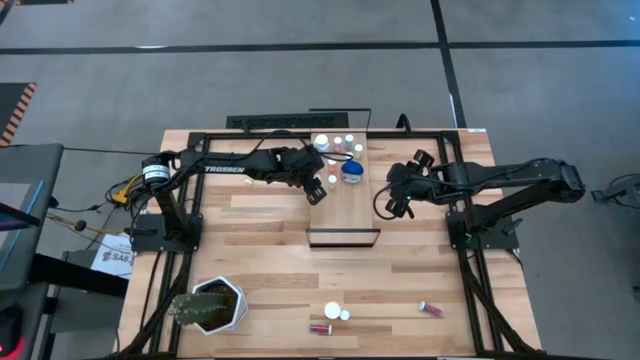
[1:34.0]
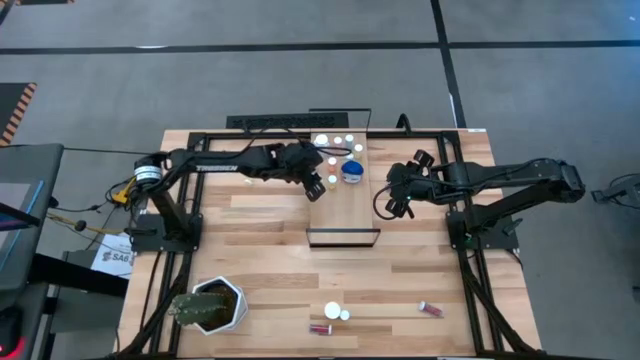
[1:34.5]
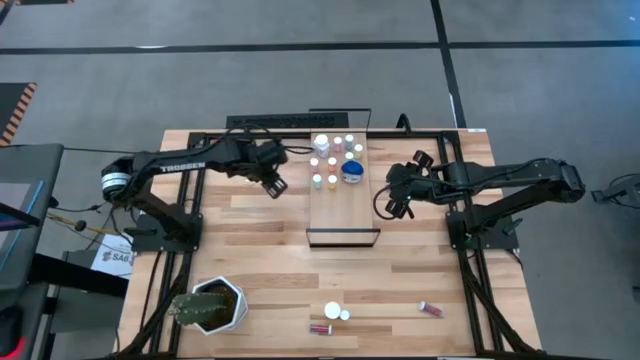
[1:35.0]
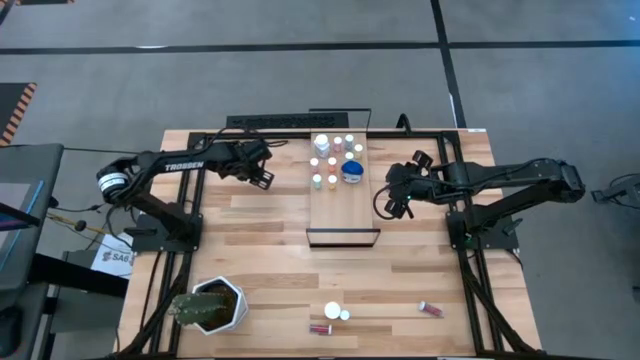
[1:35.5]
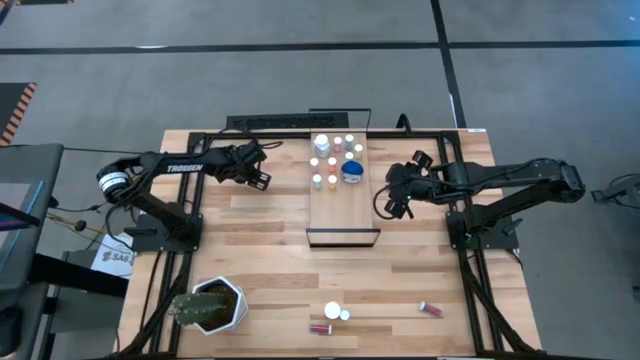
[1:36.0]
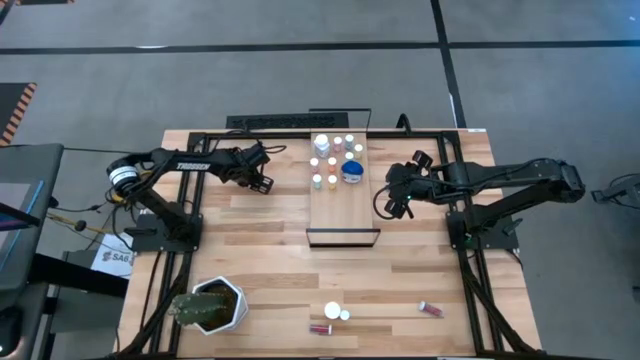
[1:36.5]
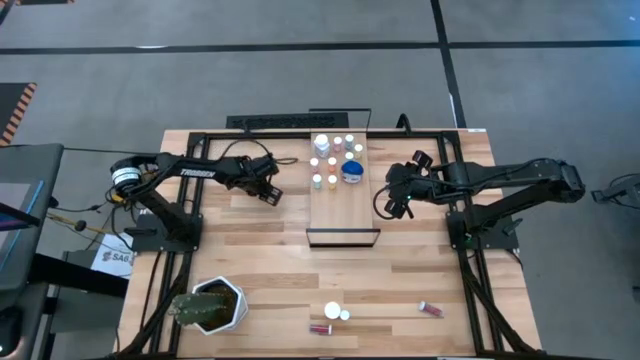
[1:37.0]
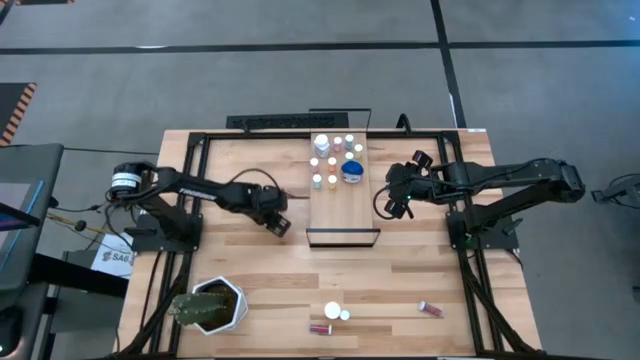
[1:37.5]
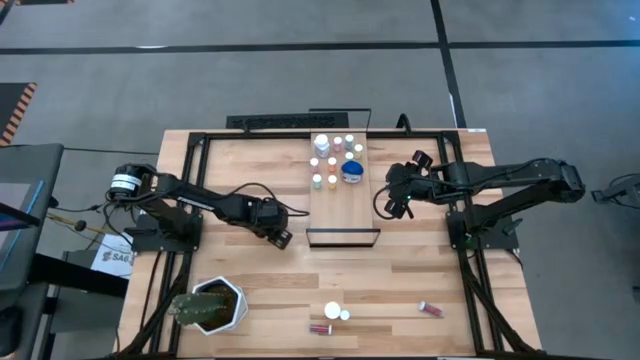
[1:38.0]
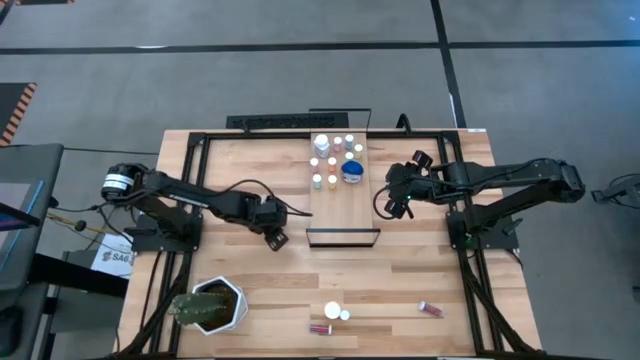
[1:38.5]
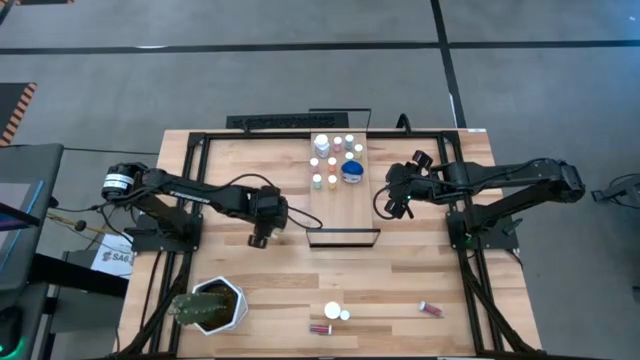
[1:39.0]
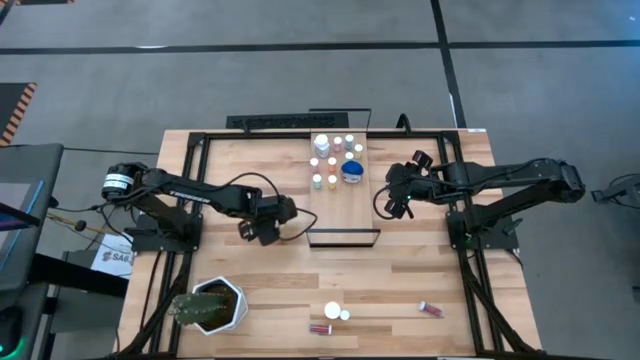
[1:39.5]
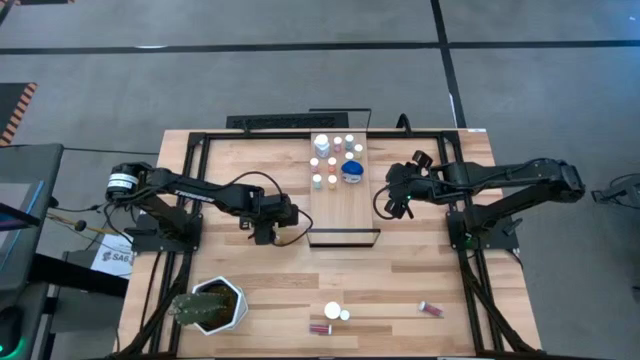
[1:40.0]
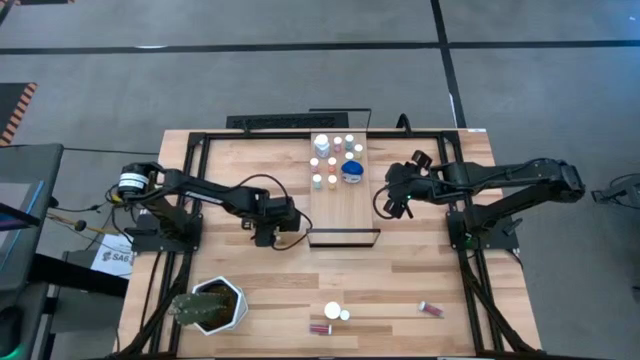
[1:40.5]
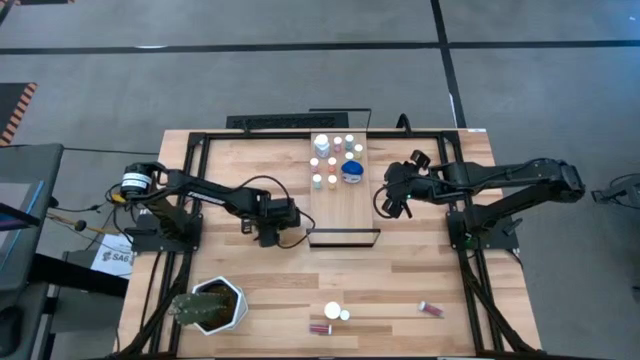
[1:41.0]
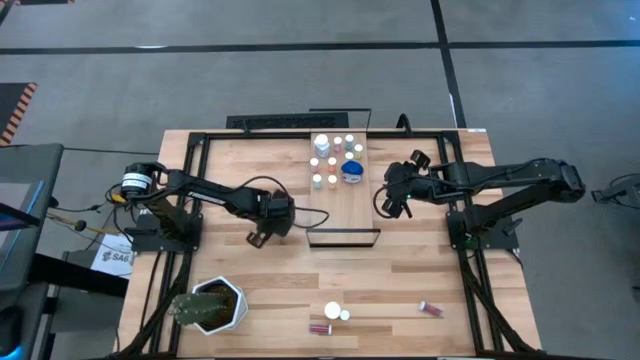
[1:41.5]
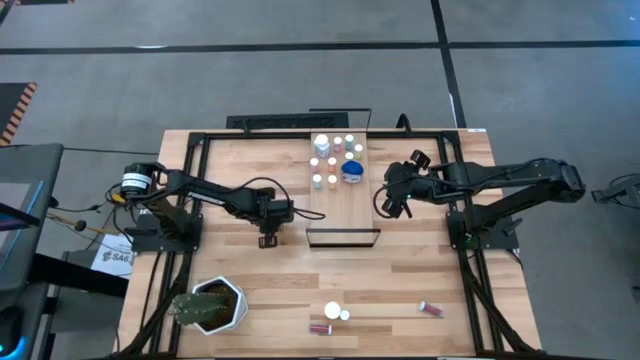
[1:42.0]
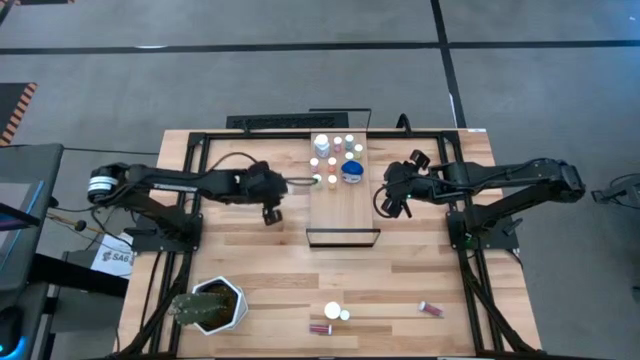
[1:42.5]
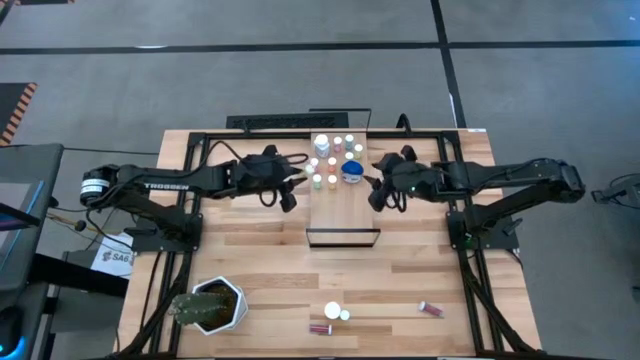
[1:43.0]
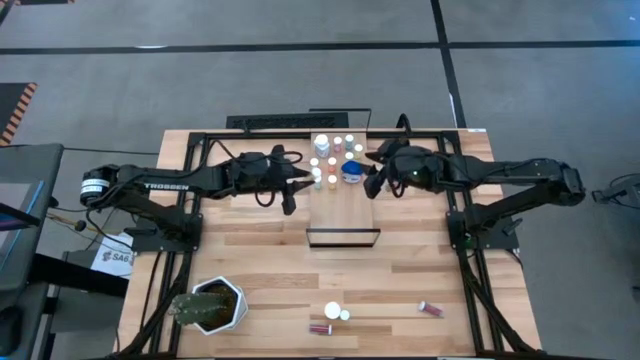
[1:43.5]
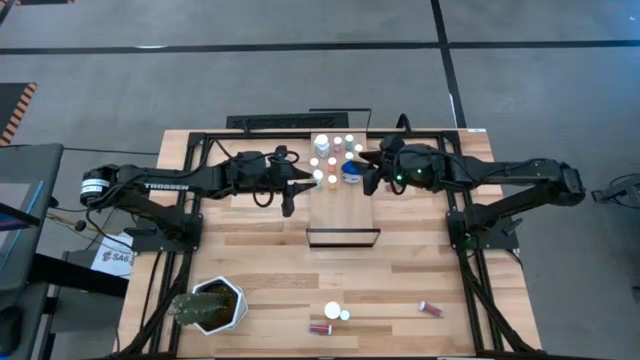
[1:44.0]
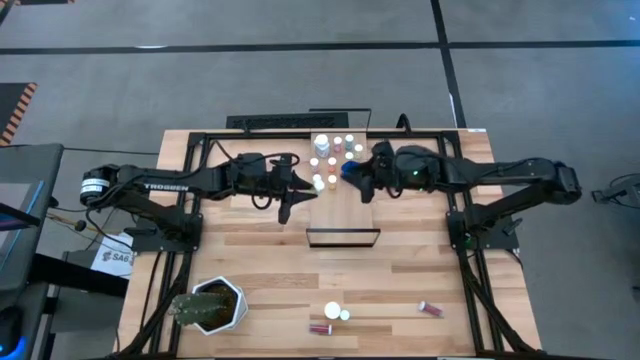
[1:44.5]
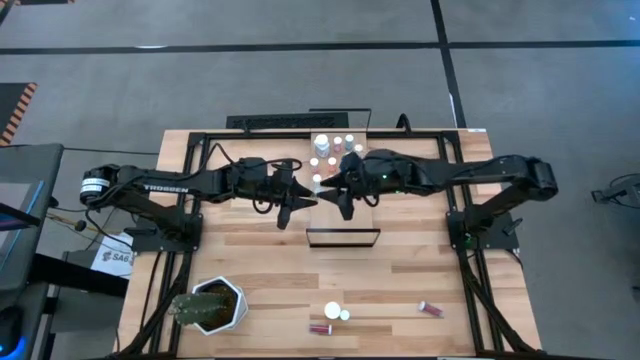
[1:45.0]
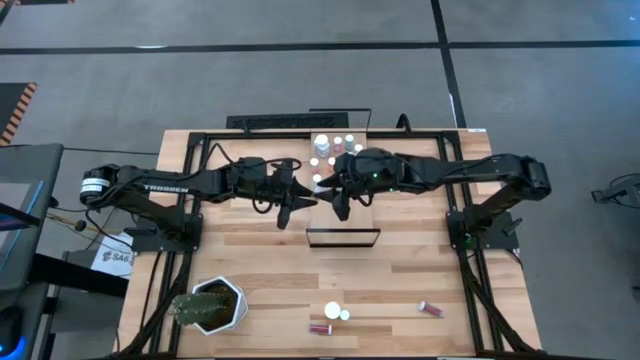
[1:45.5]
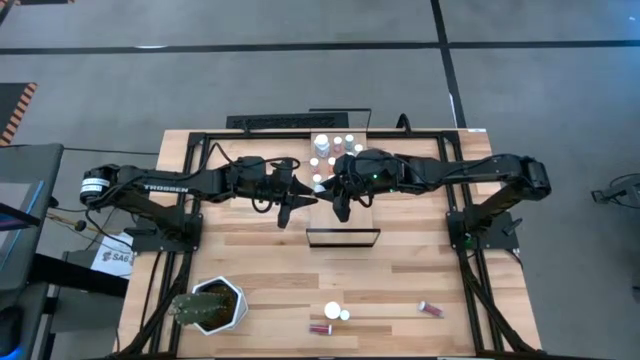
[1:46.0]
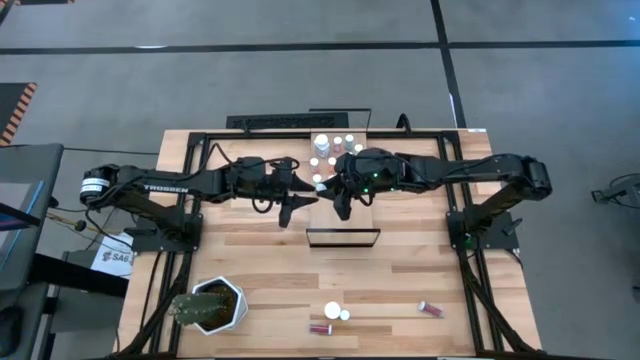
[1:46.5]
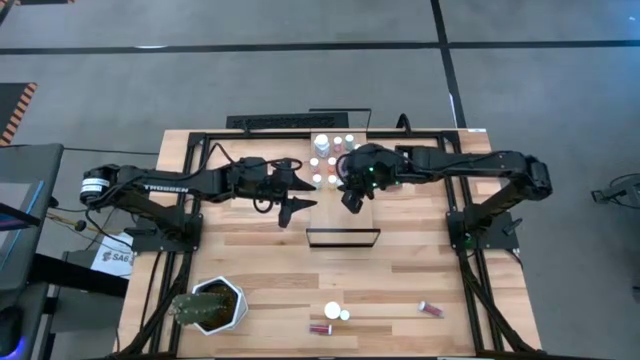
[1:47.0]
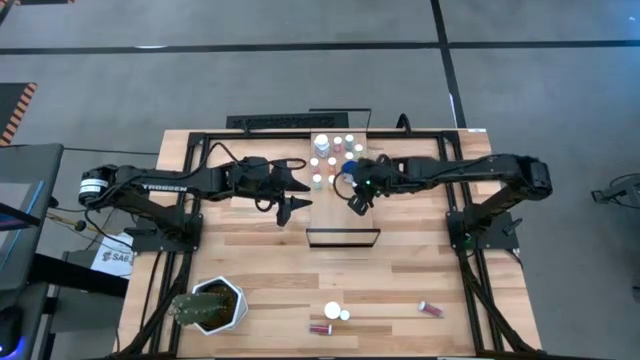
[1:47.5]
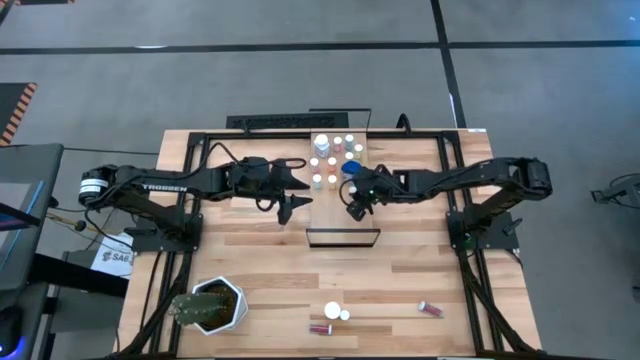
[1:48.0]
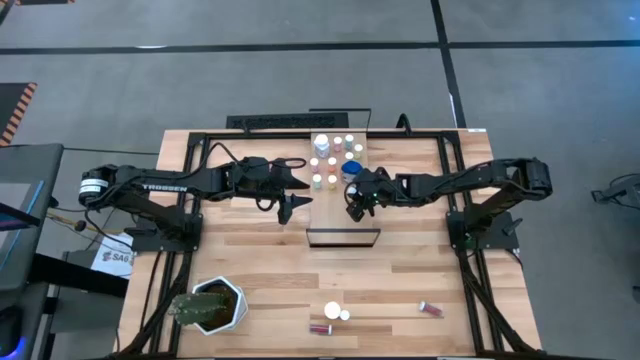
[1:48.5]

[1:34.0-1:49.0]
Task: Pick and place medicine bottles onto shelf by color
Put the yellow pill bottle on the shelf

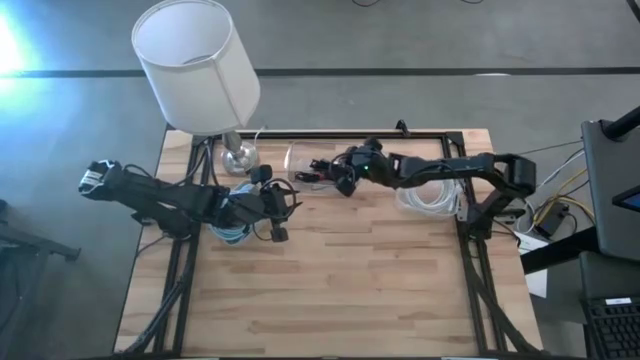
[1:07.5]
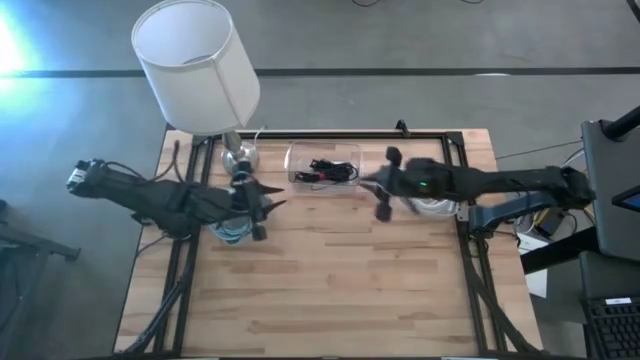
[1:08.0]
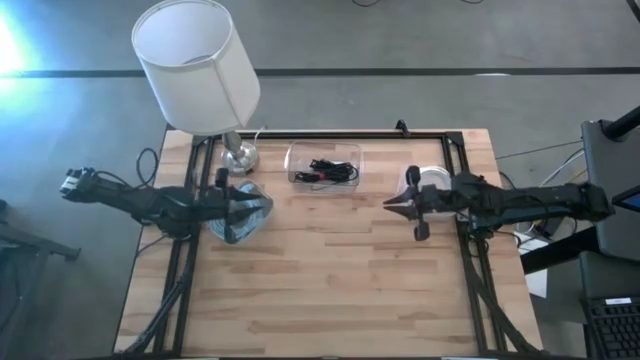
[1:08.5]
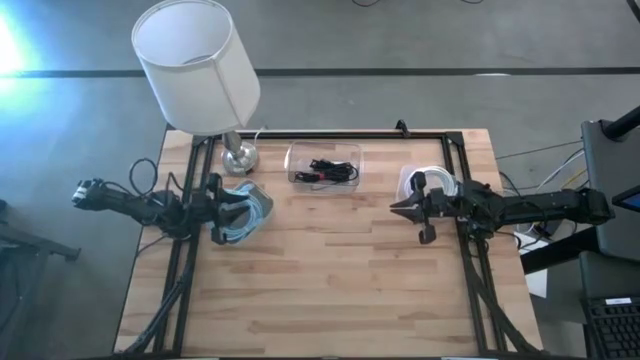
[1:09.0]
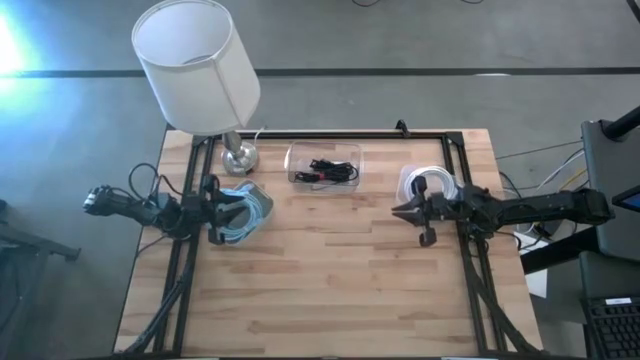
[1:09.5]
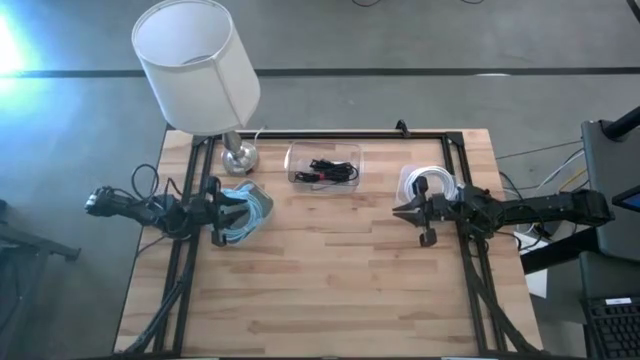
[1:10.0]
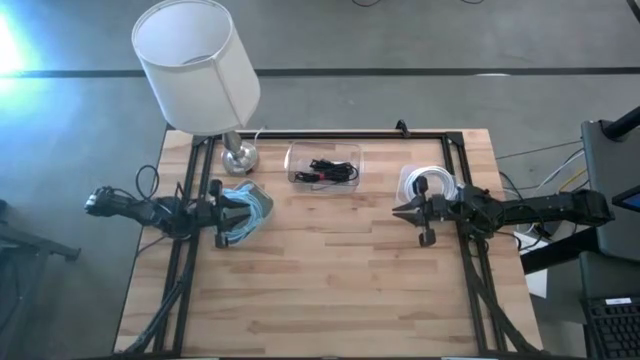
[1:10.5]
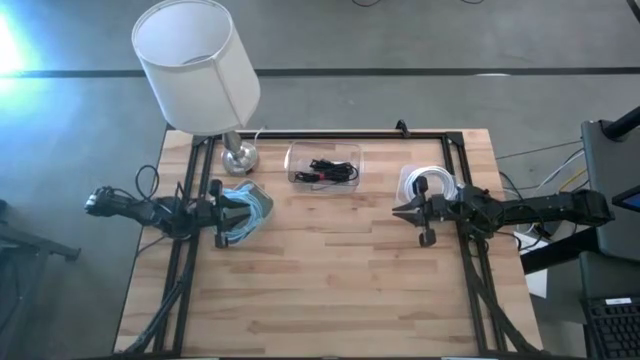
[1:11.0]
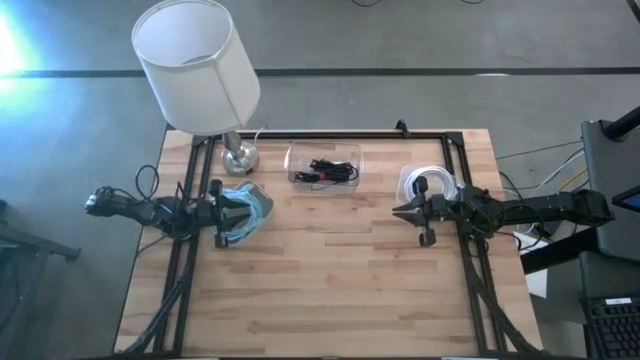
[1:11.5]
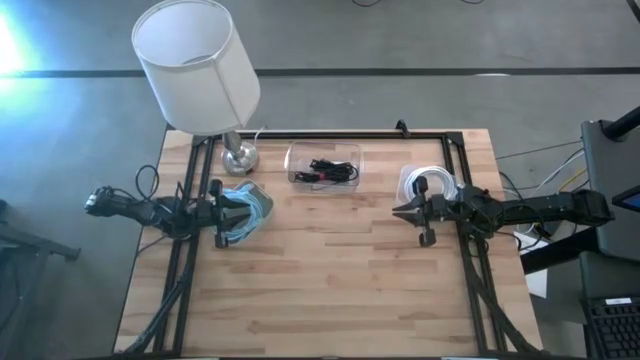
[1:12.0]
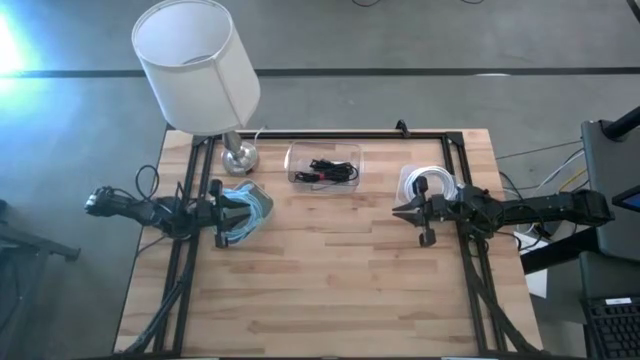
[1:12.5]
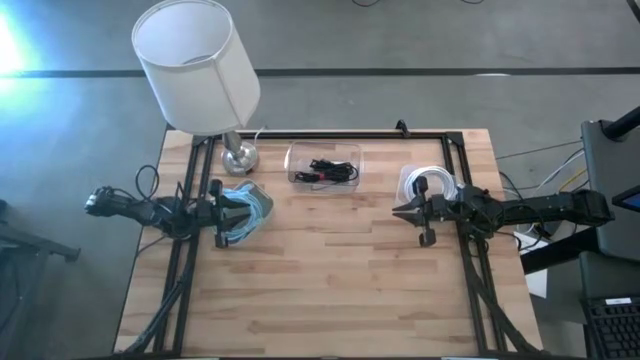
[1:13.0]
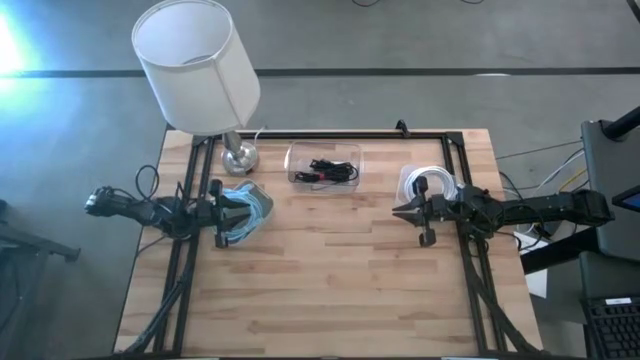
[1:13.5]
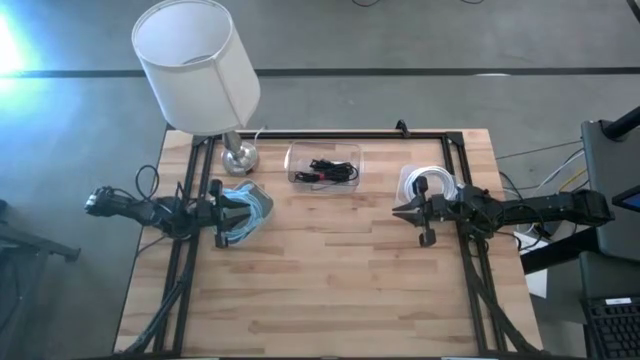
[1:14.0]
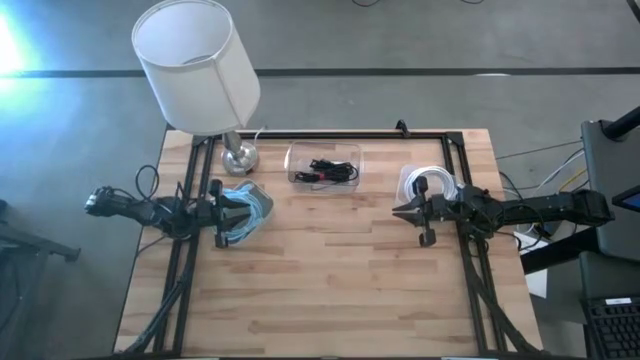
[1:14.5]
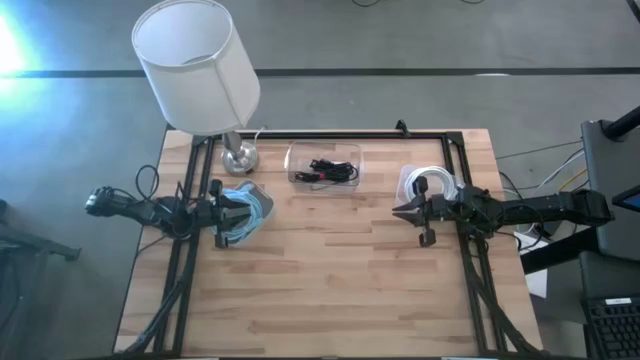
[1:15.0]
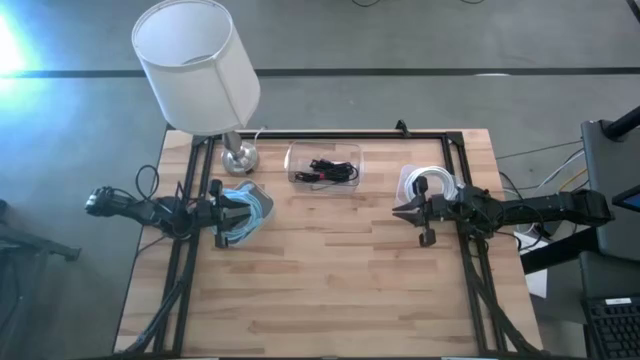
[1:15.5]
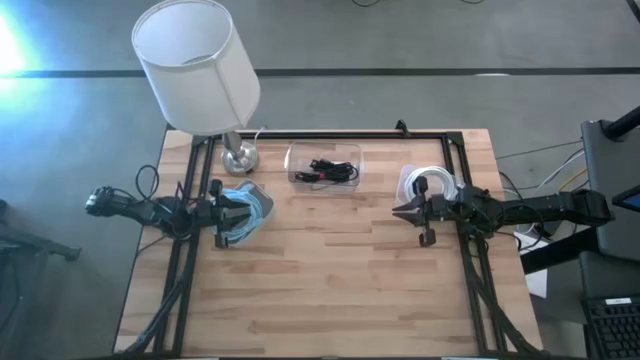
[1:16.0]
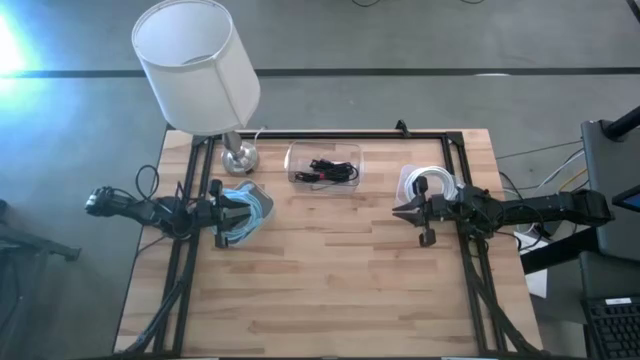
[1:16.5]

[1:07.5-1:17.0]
Task: Pick & Place USB Port
Return to Home Position
